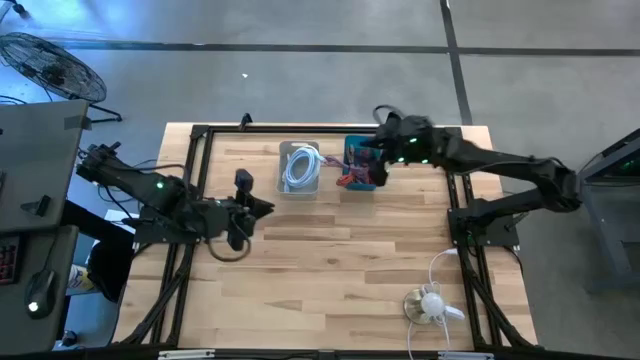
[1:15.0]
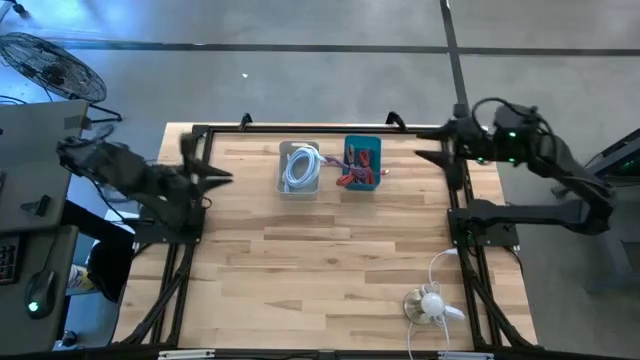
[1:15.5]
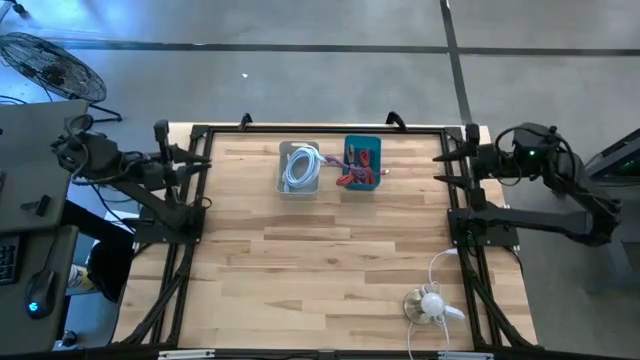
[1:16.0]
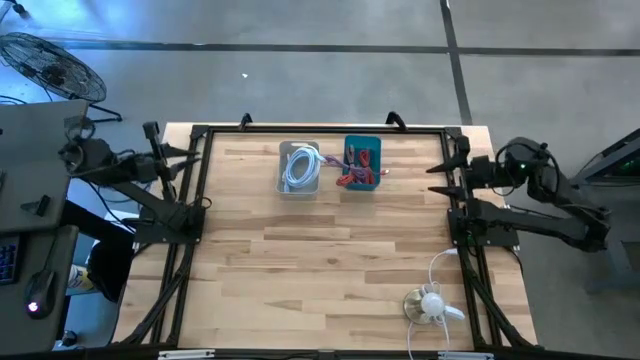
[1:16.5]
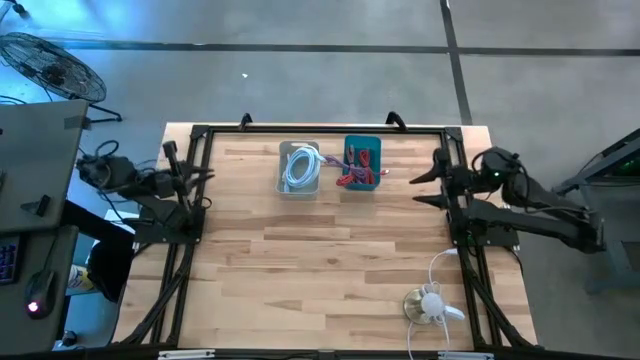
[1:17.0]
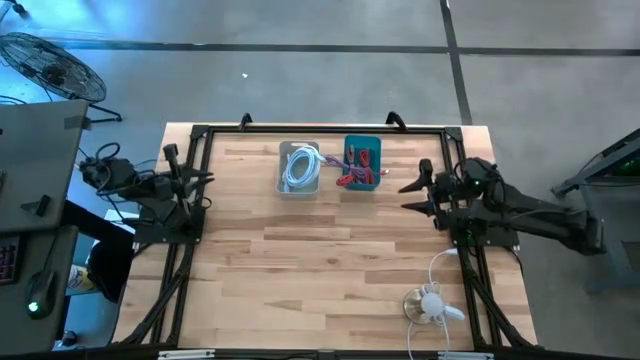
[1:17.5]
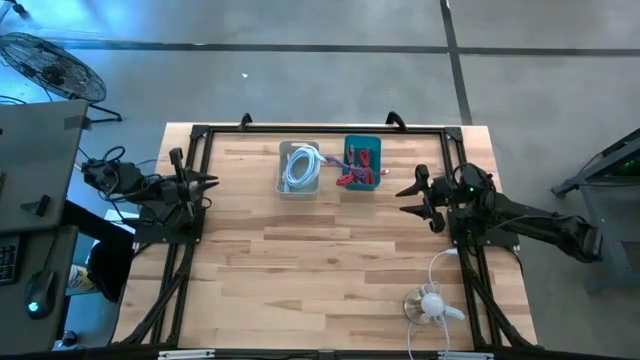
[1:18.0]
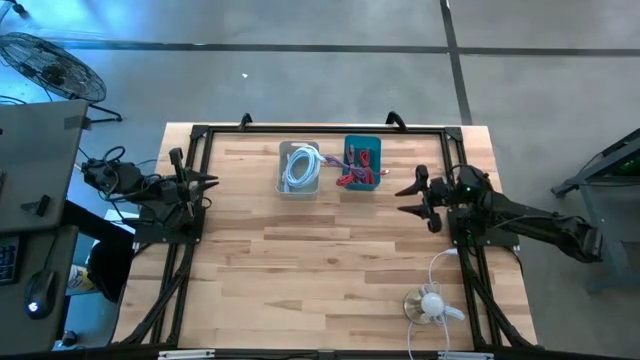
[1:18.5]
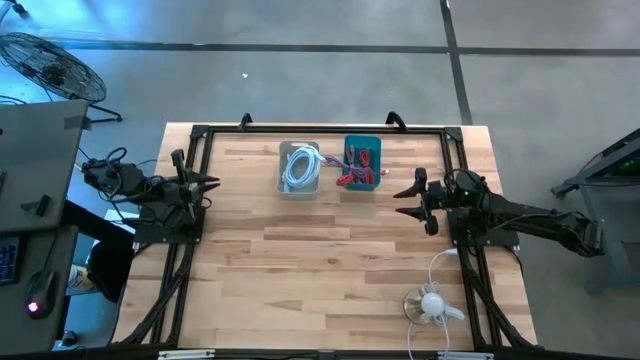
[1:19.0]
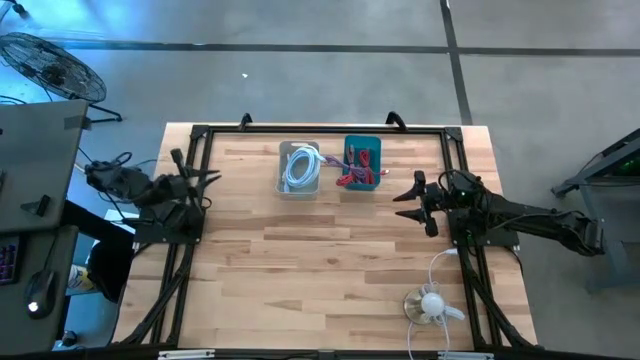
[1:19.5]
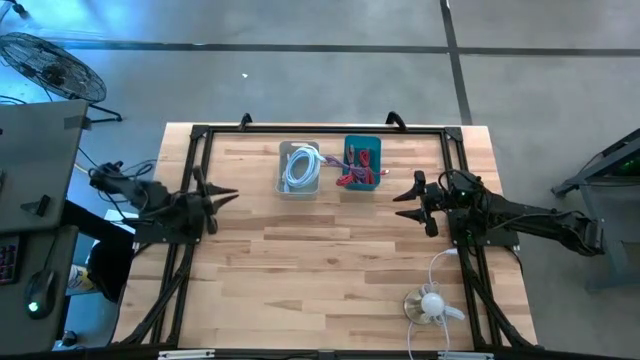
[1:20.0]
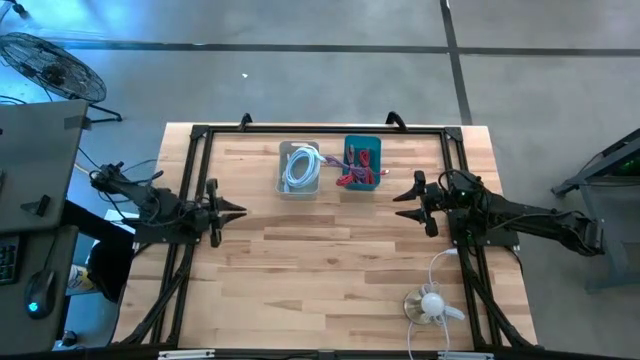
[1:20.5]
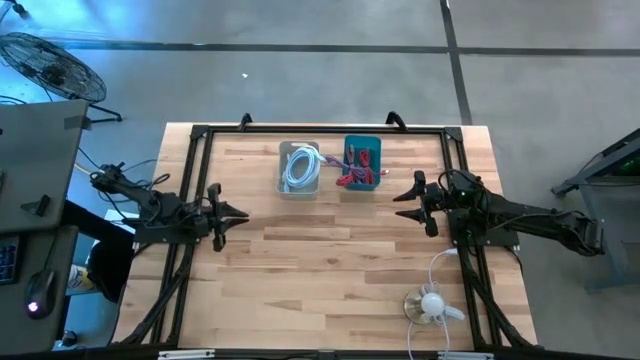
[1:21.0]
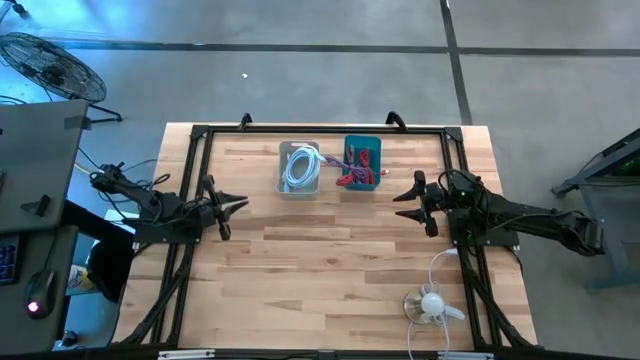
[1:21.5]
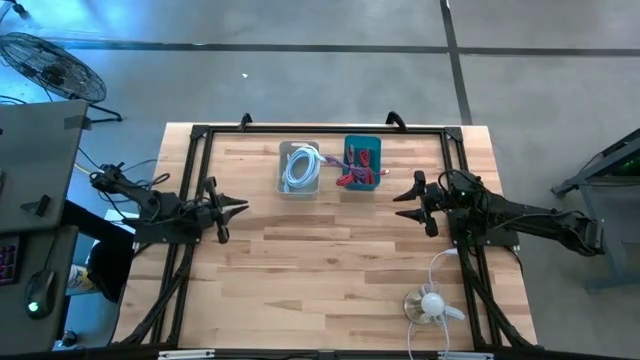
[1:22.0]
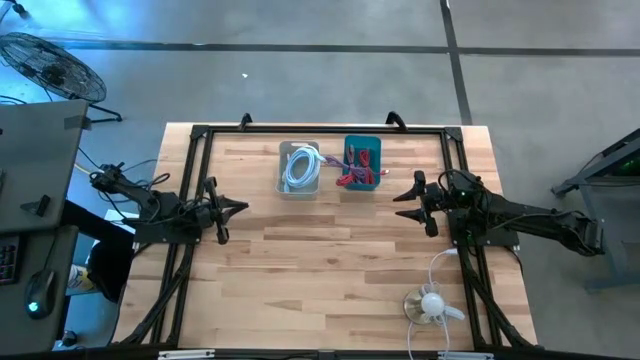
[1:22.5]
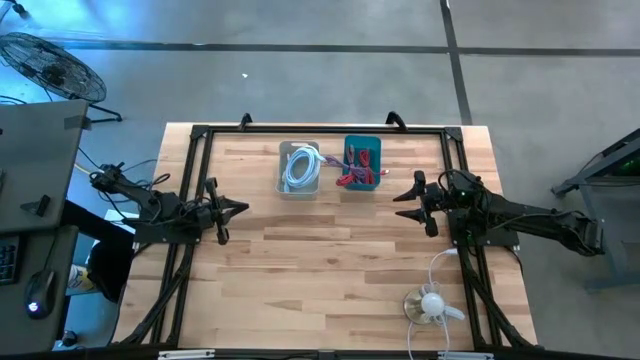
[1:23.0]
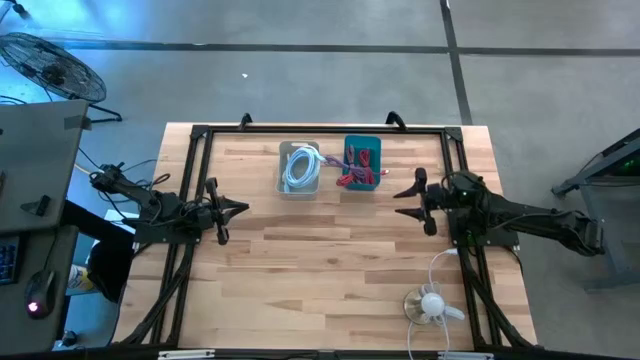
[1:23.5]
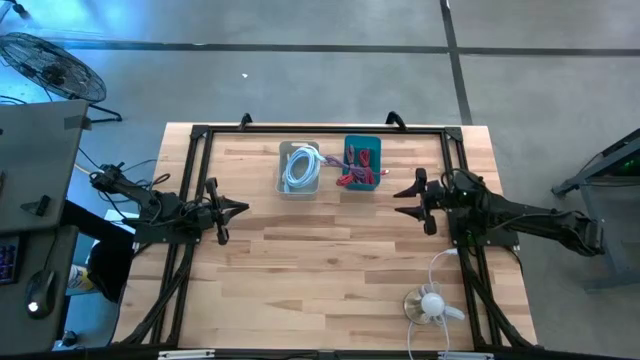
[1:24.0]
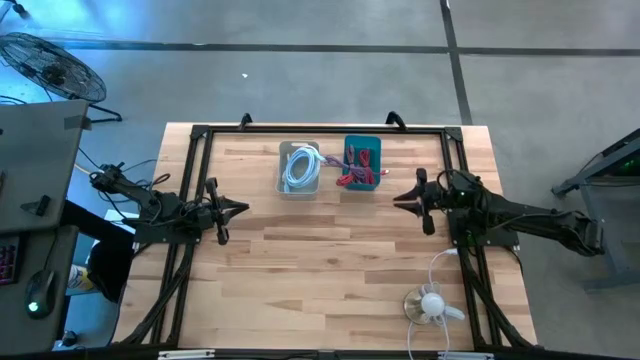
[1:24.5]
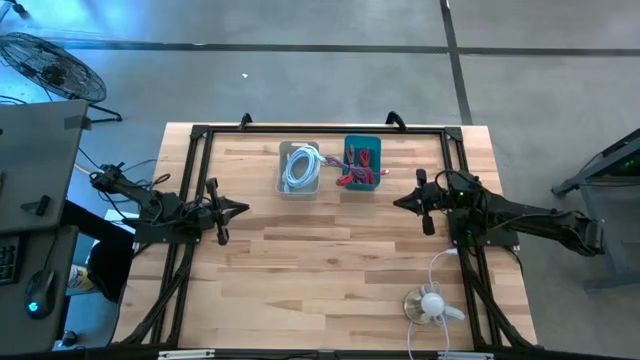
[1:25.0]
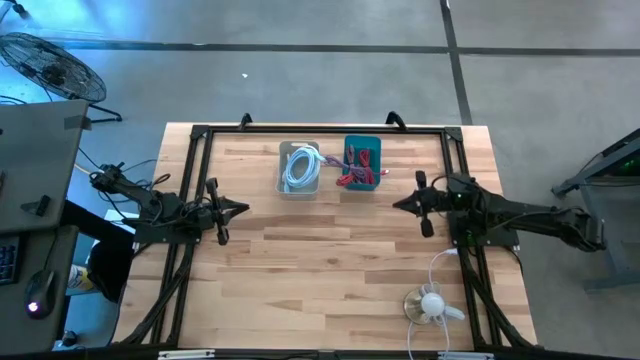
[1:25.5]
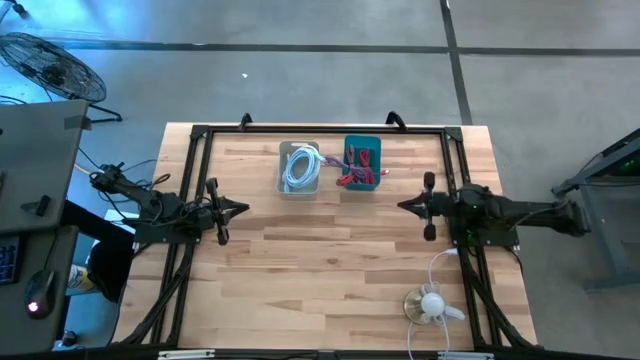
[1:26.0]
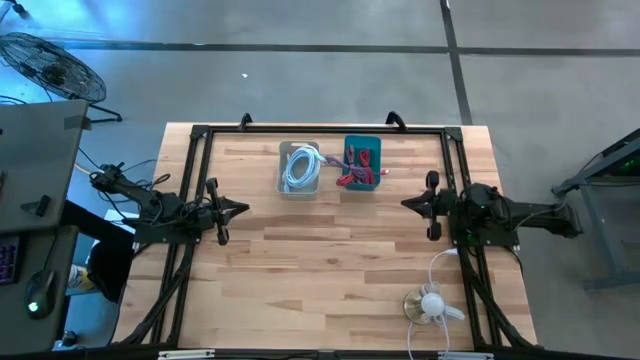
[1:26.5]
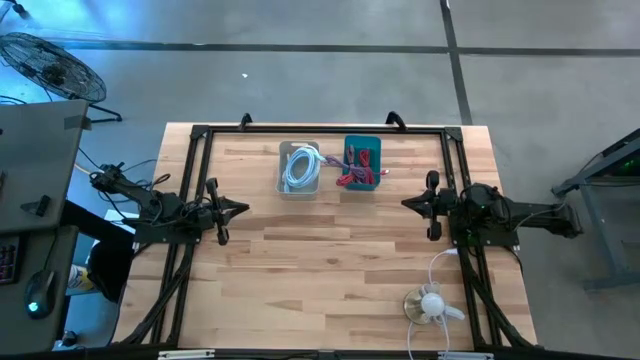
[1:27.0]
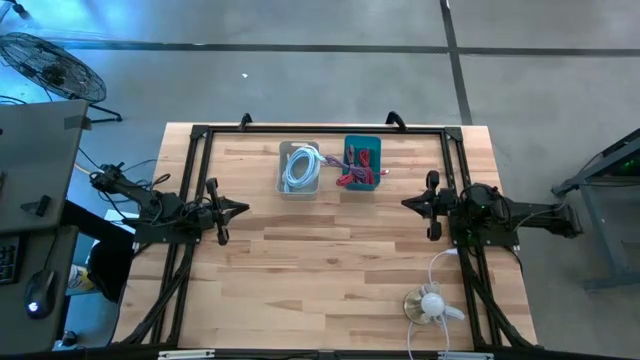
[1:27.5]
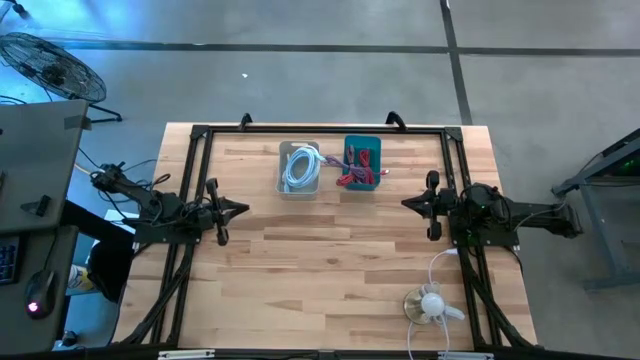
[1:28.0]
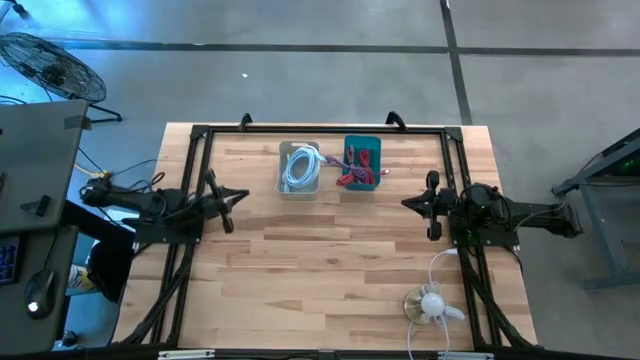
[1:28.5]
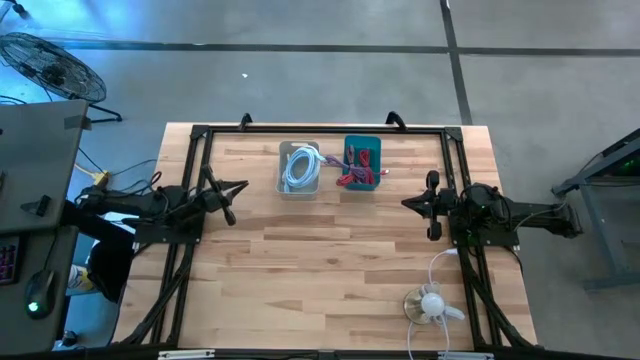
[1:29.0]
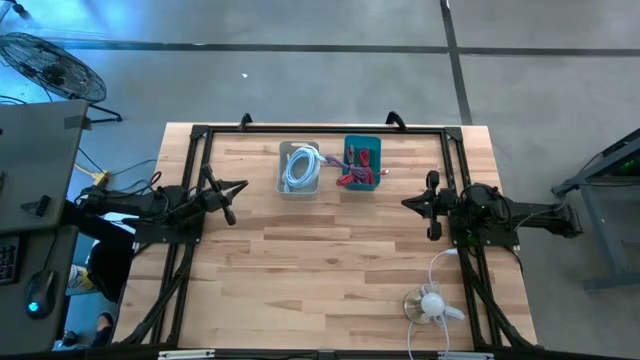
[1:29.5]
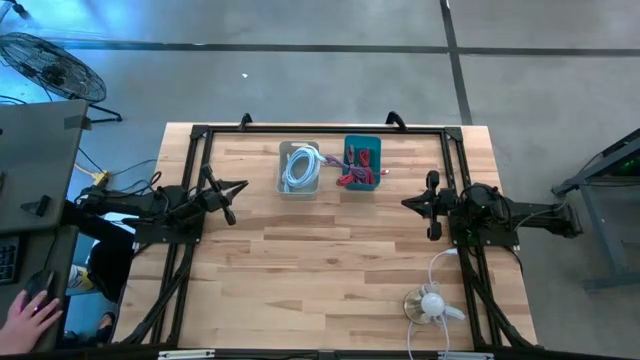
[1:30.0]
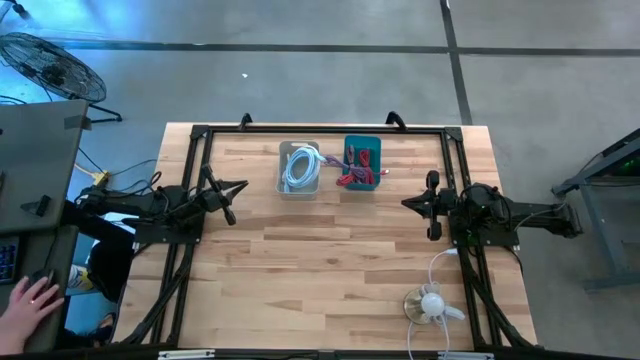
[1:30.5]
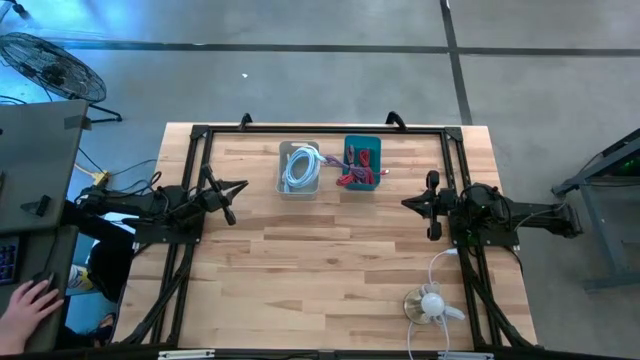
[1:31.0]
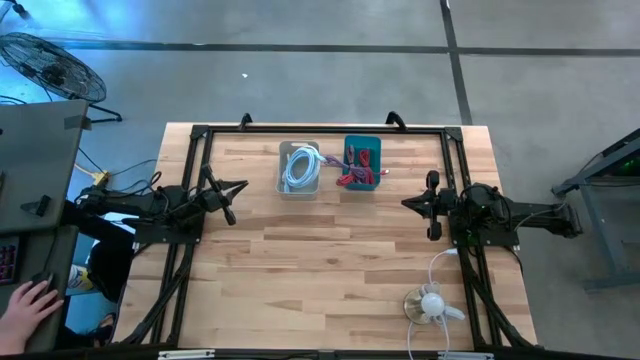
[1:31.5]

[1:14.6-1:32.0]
Task: Pick & Place USB Port
Return to Home Position

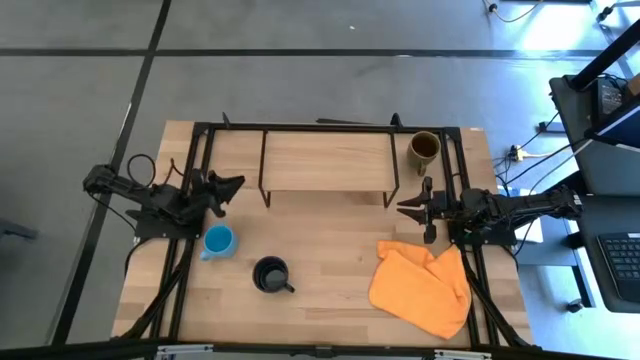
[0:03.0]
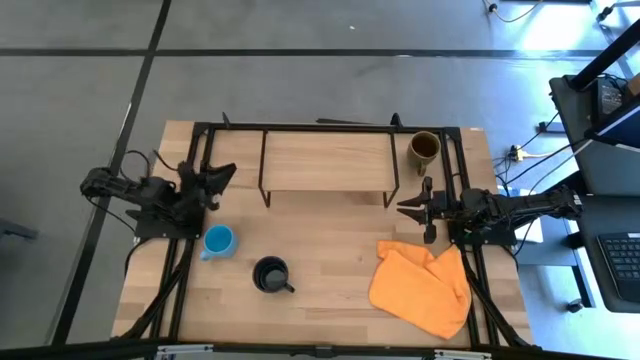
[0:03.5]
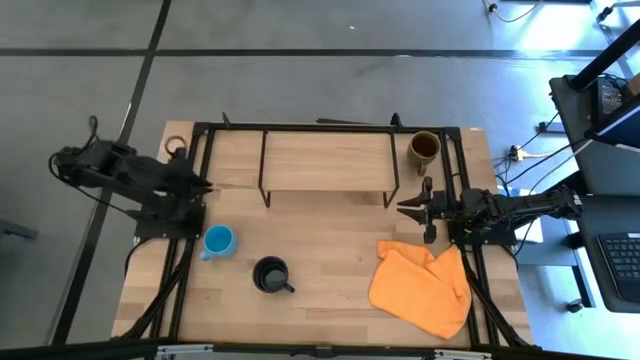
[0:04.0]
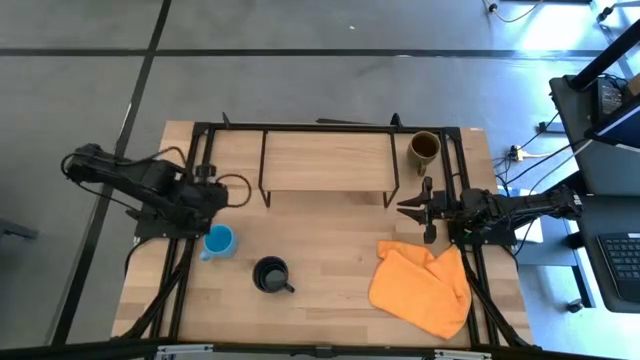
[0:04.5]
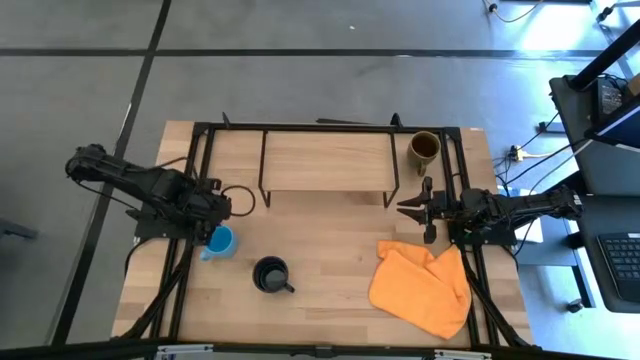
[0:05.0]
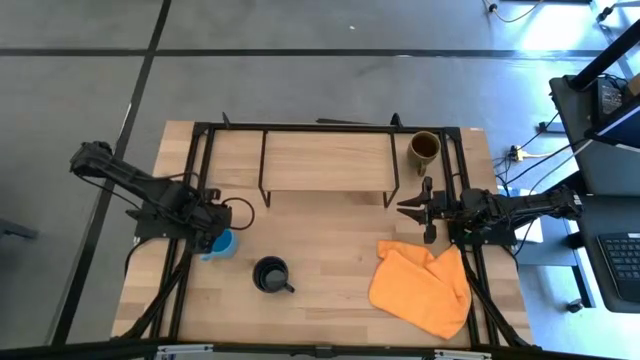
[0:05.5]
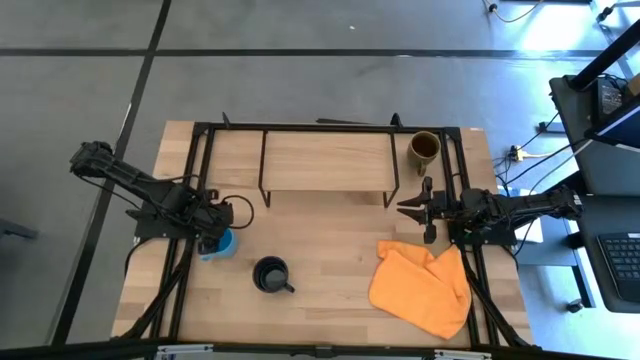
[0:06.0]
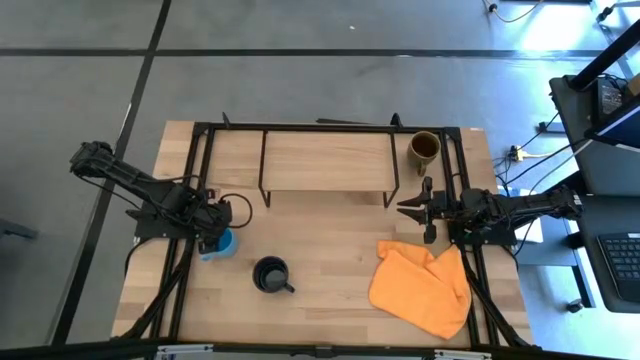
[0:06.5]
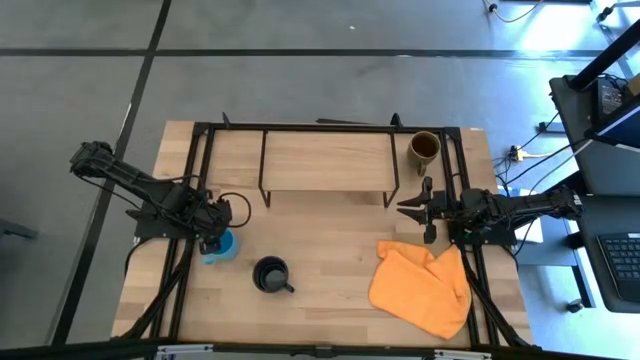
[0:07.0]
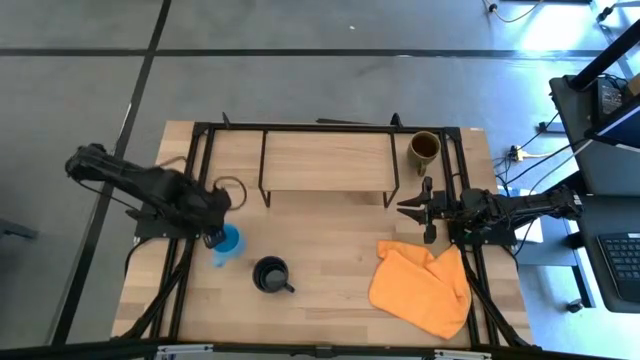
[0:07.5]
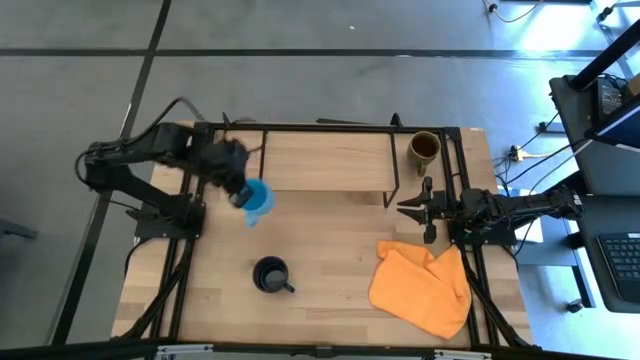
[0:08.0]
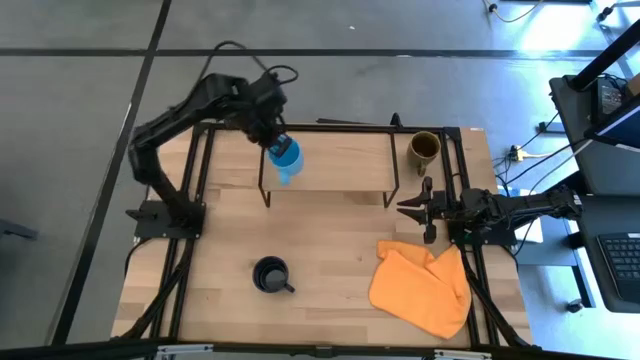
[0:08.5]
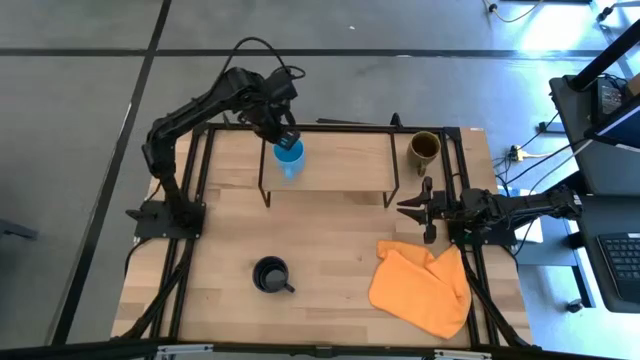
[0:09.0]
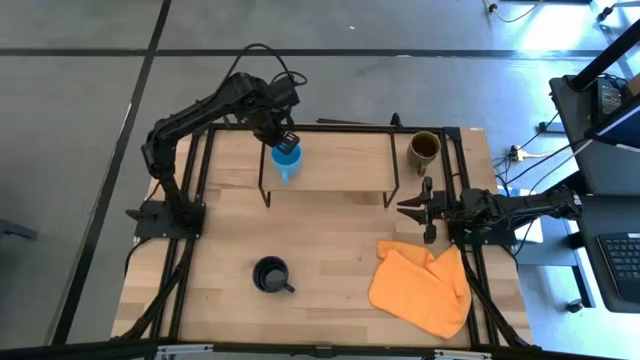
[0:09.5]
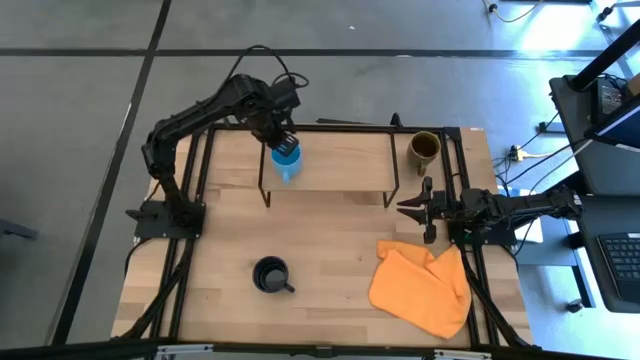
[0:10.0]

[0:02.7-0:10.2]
Task: Stack small to large cups/mugs on shelf
Put the light blue mug on the shelf
